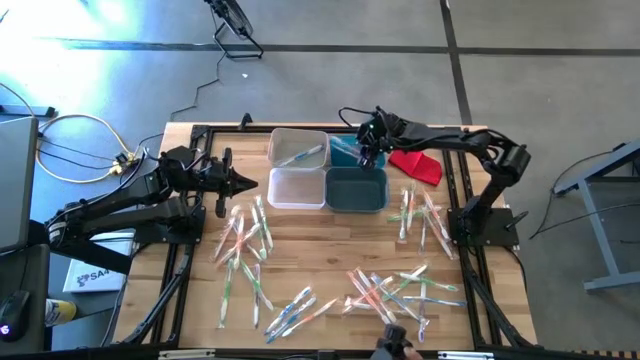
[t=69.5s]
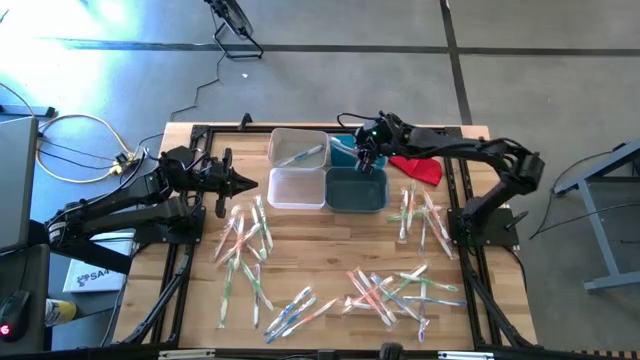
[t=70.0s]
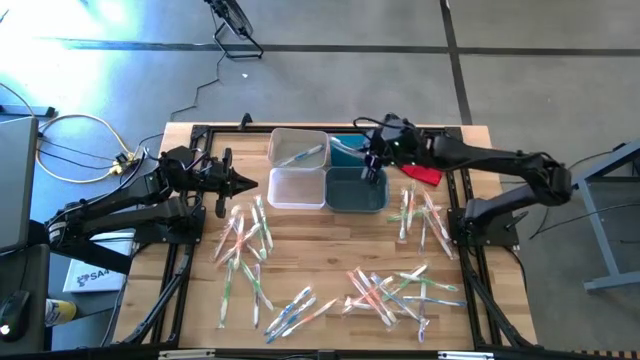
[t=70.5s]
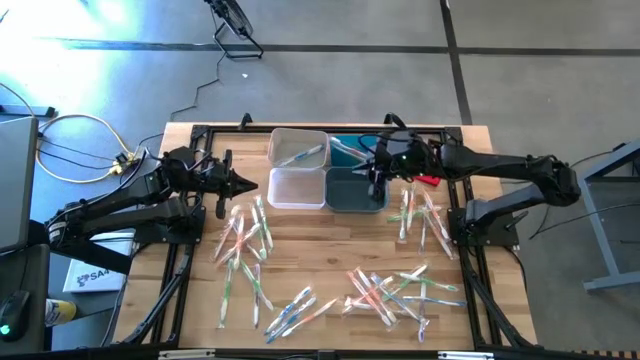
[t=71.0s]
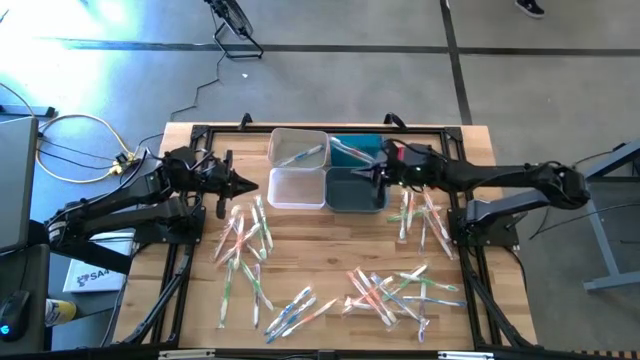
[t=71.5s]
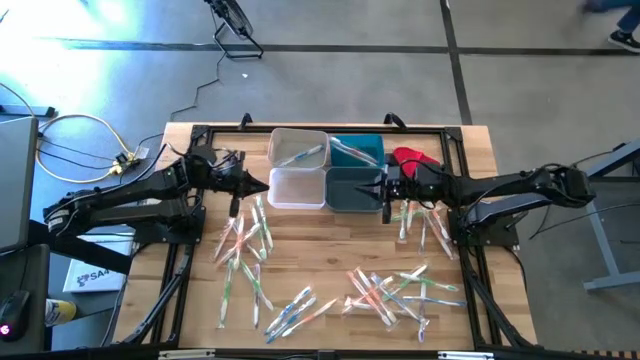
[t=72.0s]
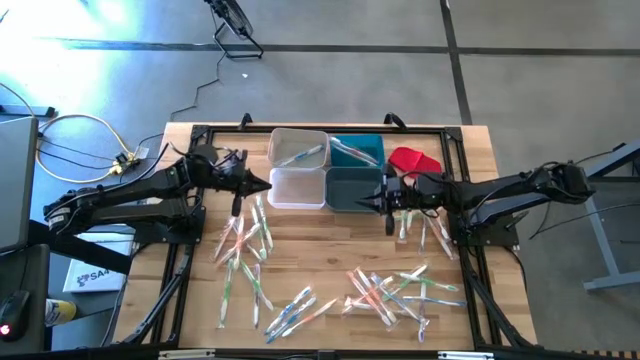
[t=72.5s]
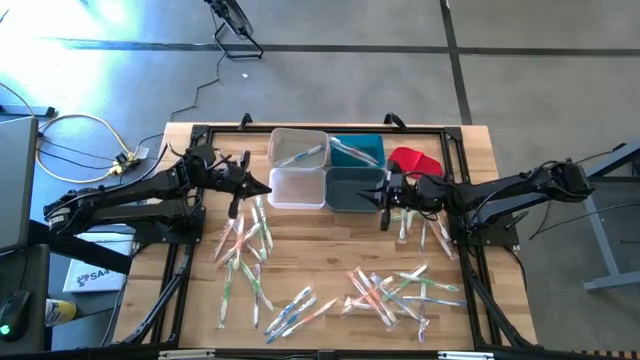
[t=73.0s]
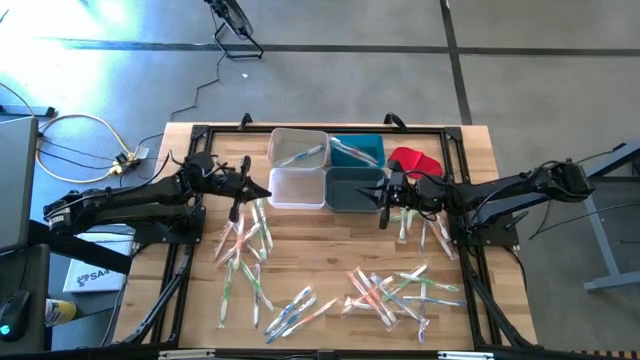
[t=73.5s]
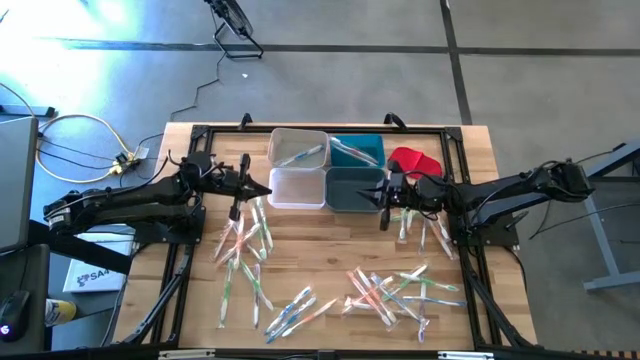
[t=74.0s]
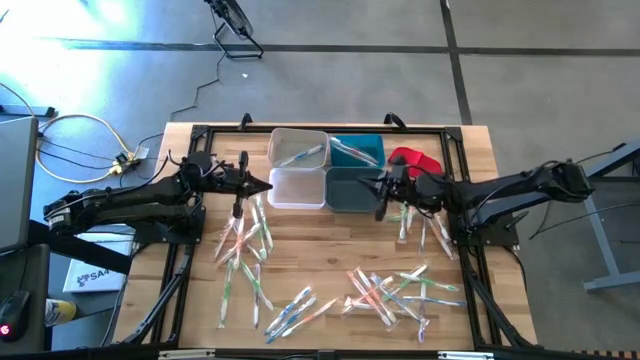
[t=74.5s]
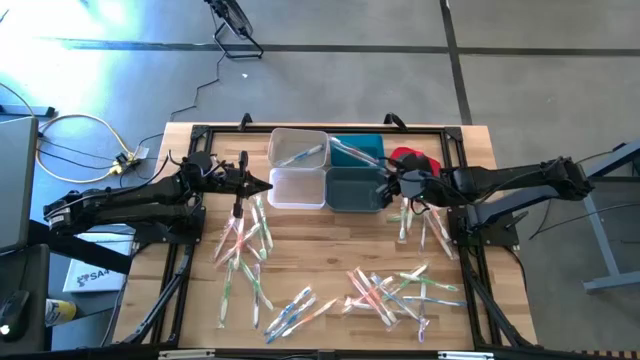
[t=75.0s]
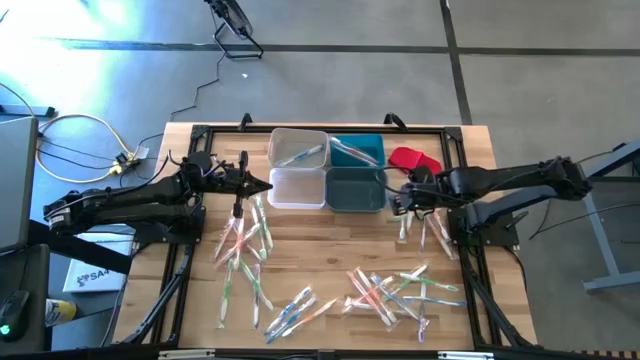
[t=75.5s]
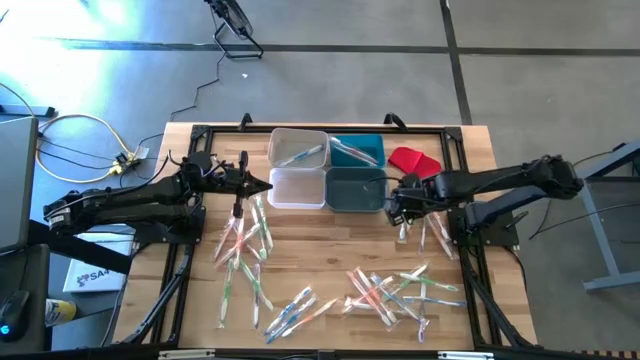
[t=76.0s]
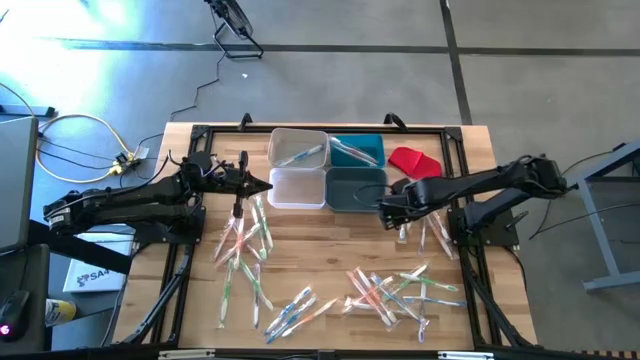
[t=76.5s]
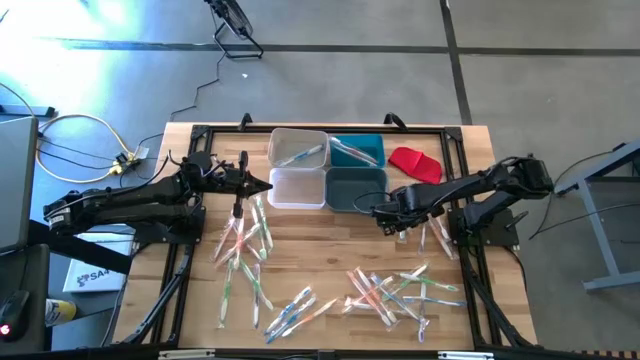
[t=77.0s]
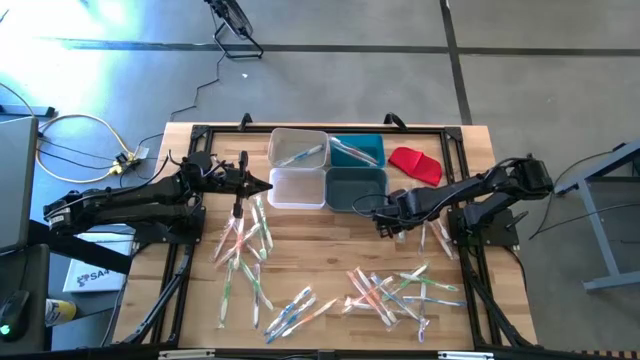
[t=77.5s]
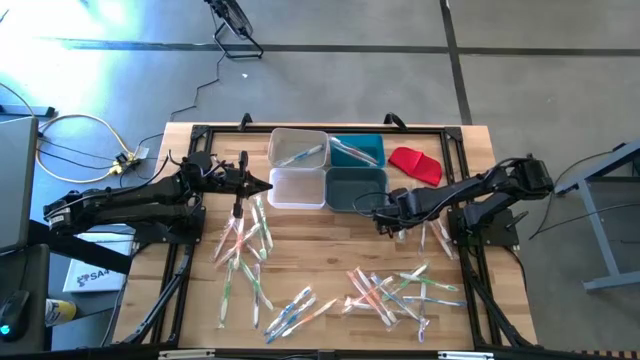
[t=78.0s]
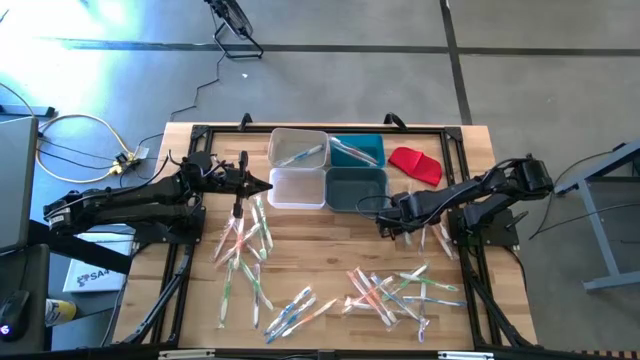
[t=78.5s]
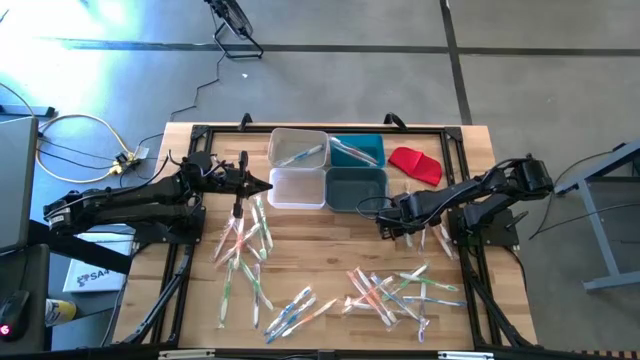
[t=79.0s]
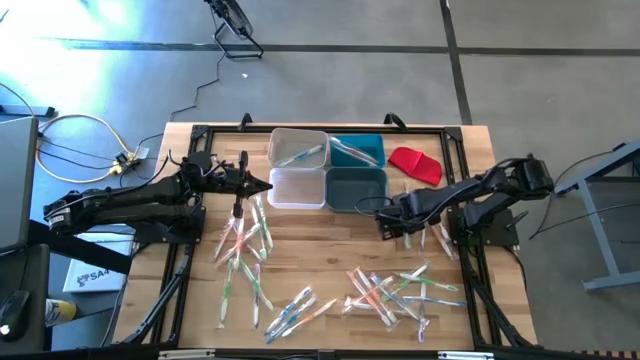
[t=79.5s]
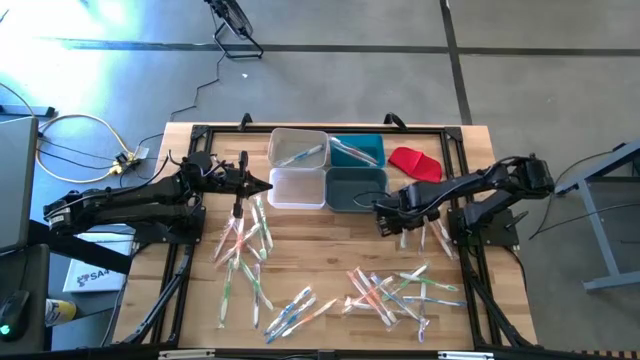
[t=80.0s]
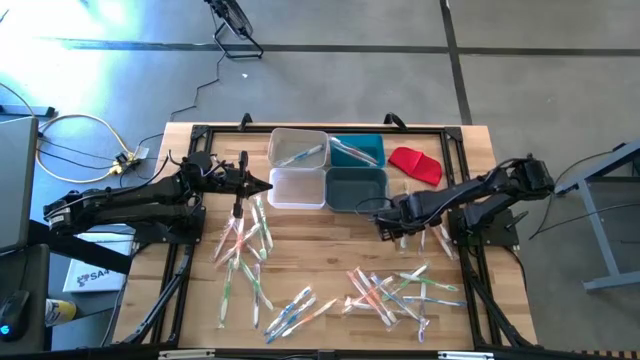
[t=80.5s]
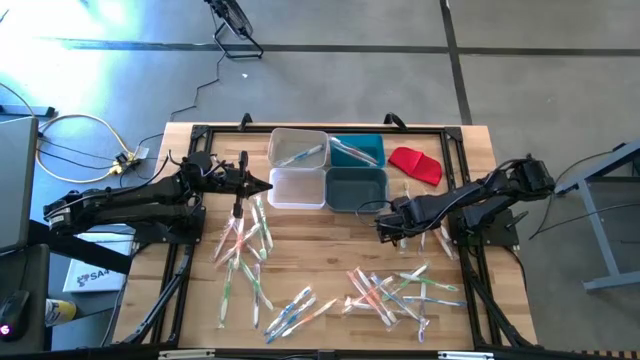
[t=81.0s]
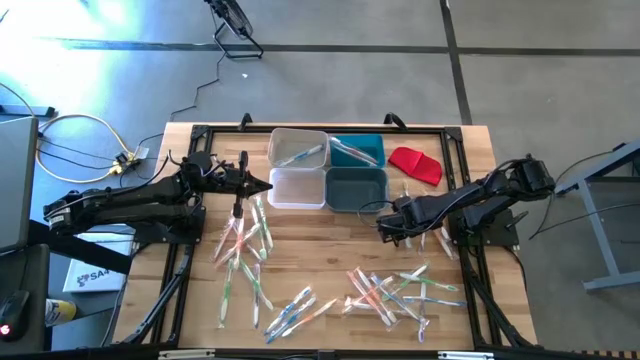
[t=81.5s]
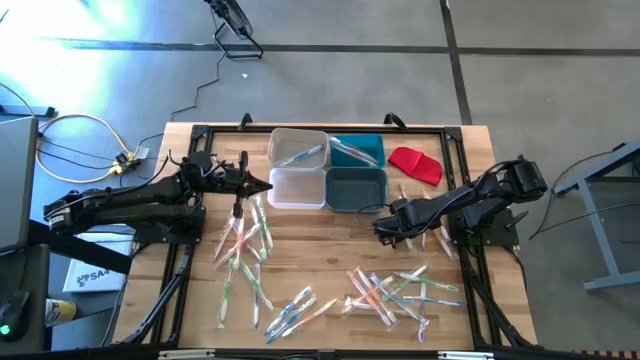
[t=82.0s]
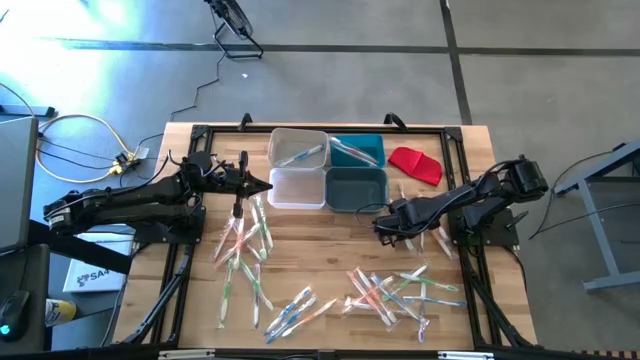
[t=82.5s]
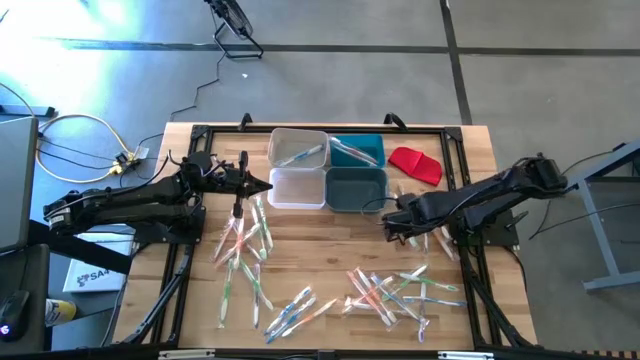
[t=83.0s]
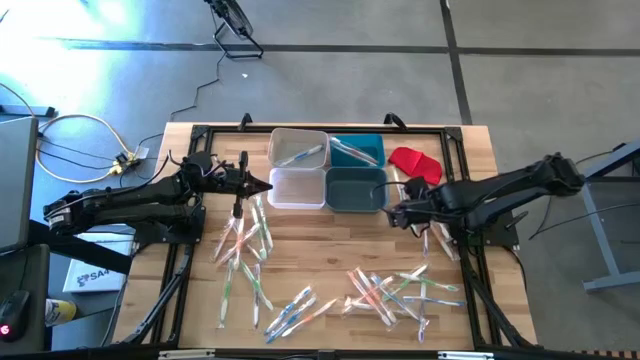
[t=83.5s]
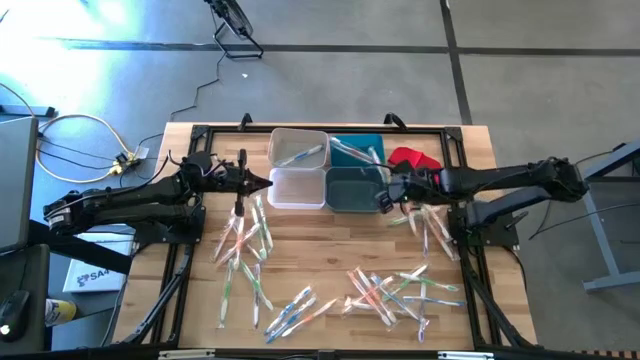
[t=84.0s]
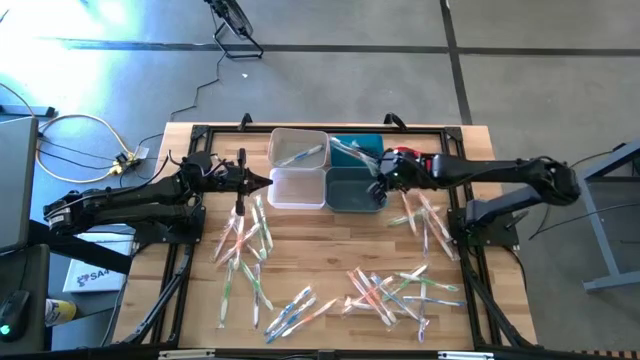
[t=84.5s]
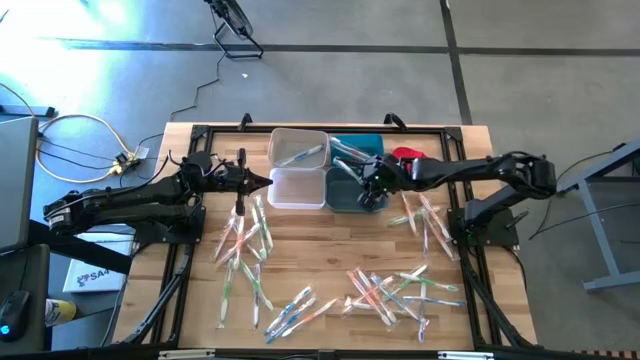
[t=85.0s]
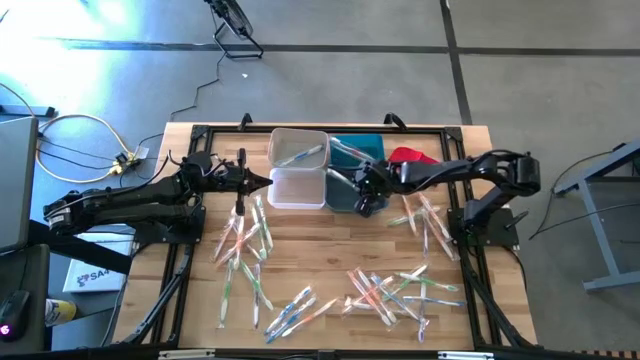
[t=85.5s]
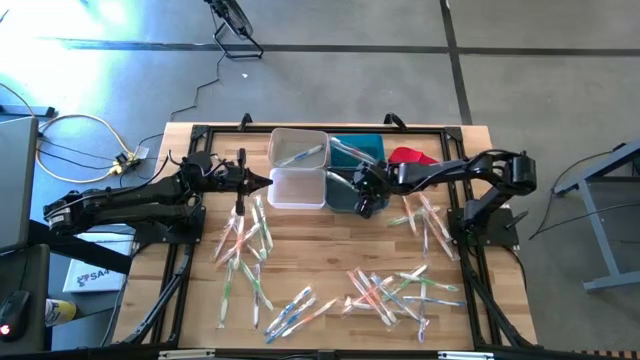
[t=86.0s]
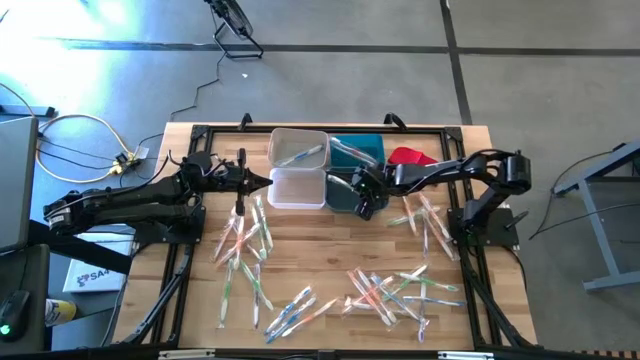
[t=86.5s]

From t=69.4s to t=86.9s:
Task: Pick & Place Toothbrushes
Put the green toothbrush into the green bin

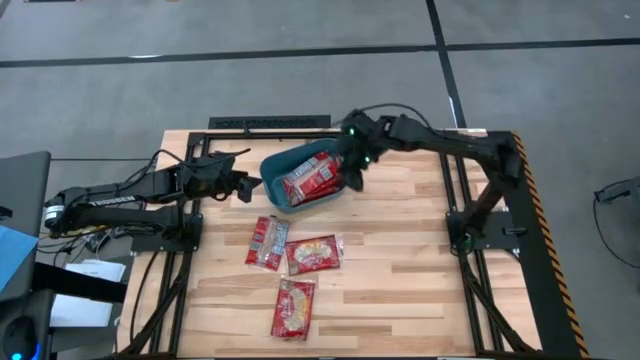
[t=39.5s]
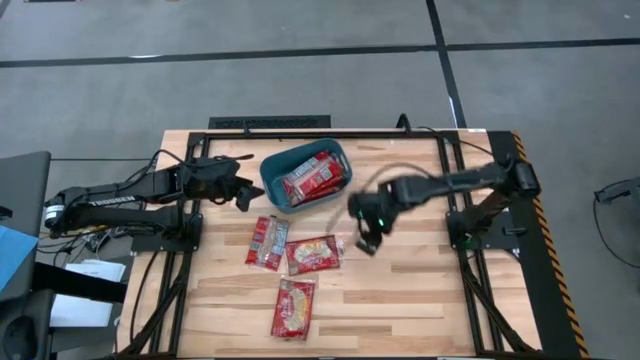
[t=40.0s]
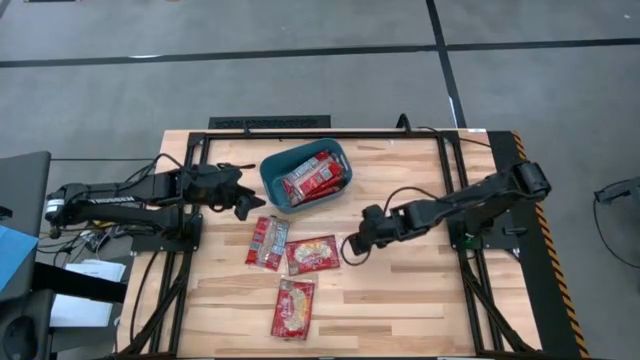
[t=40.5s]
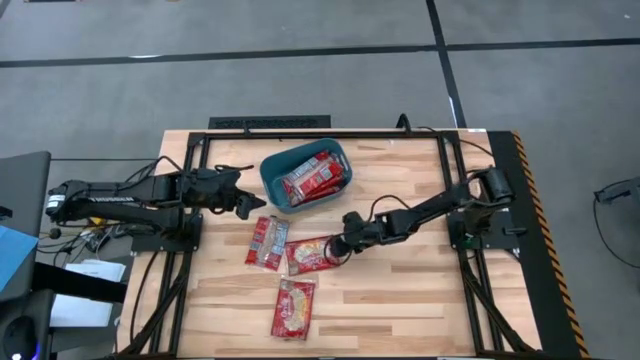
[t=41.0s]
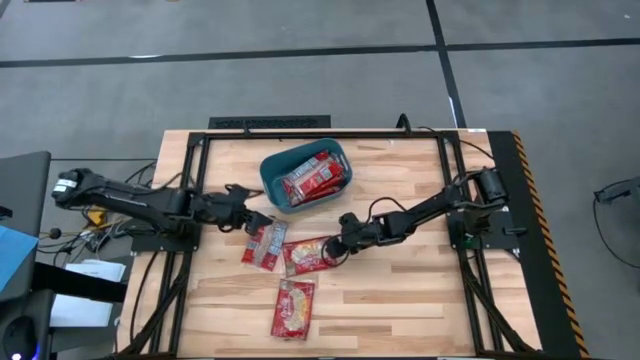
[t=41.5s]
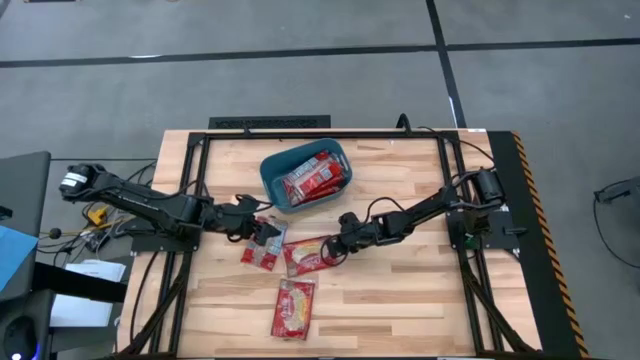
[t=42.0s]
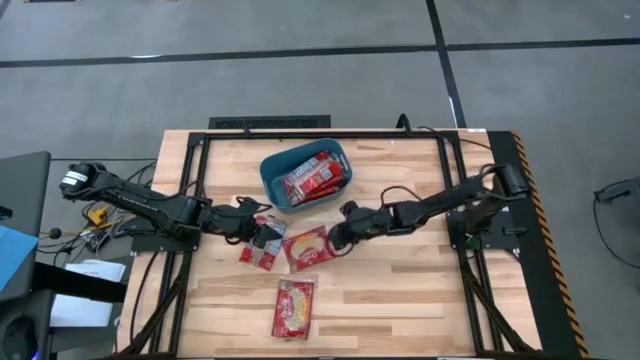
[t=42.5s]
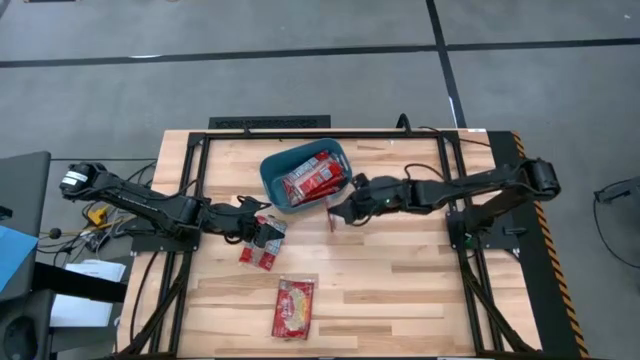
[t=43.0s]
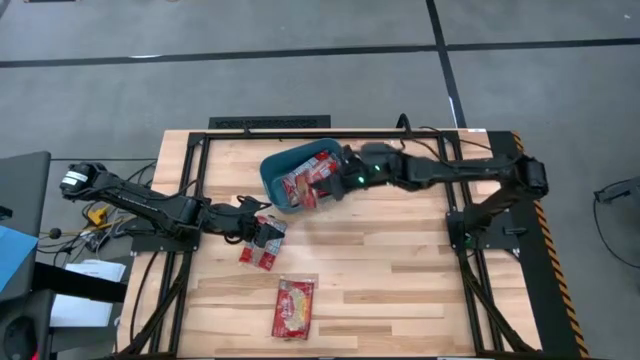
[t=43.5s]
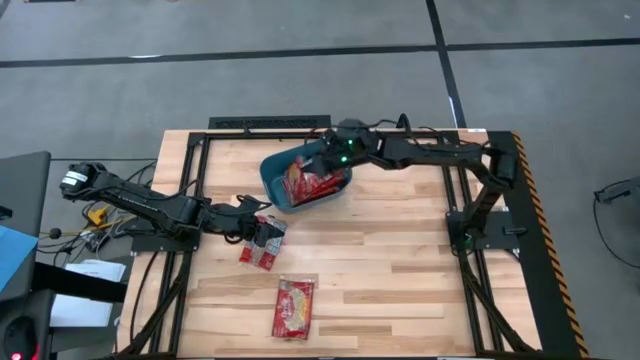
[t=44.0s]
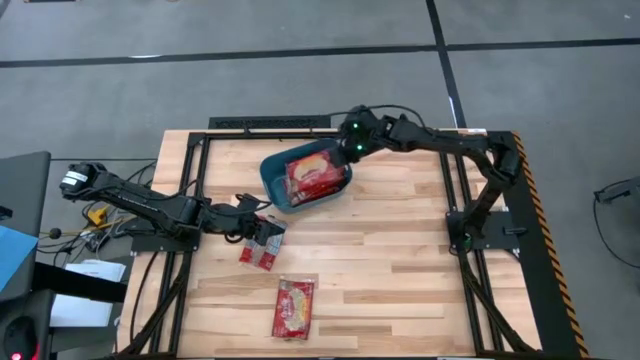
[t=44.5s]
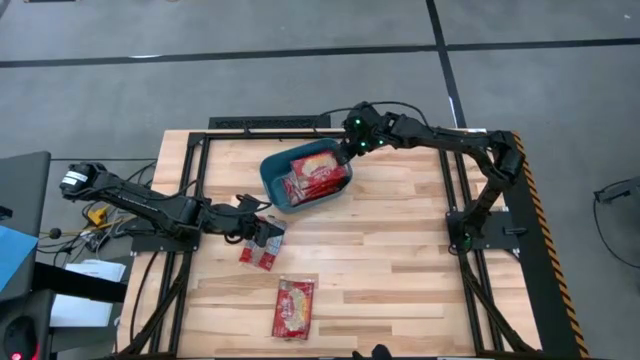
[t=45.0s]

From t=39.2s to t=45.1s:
Task: Sort popcorn bags into baskets
Put the red popcorn bag into the blue bin
